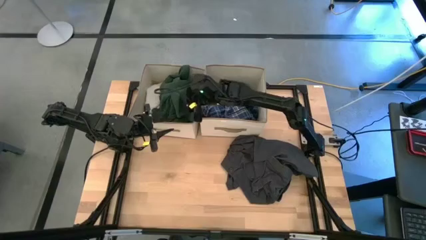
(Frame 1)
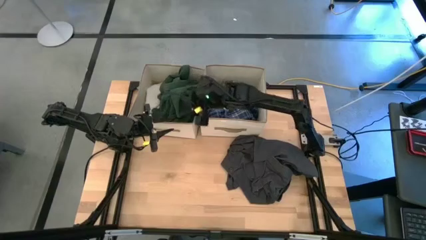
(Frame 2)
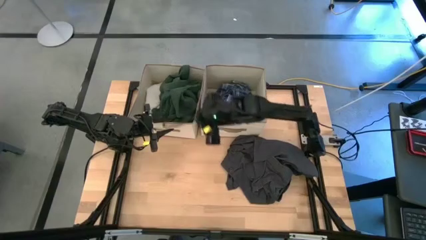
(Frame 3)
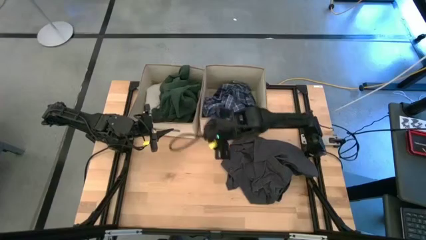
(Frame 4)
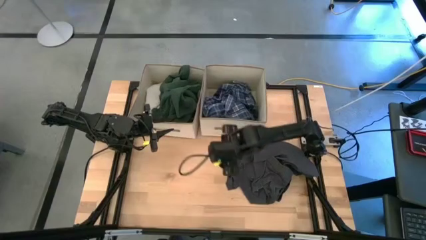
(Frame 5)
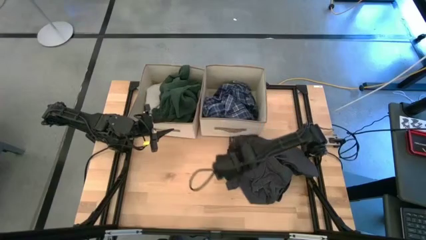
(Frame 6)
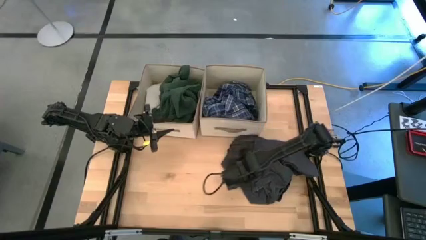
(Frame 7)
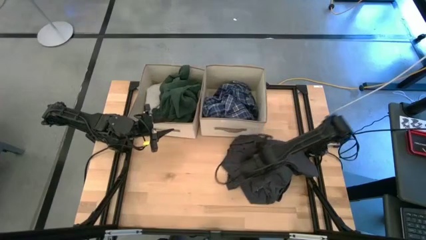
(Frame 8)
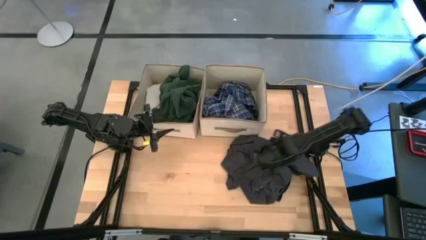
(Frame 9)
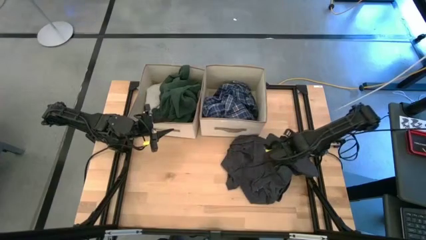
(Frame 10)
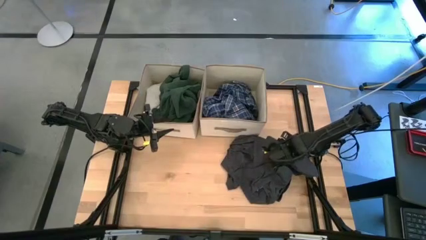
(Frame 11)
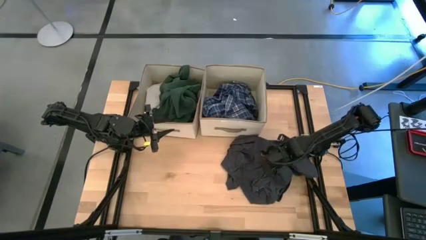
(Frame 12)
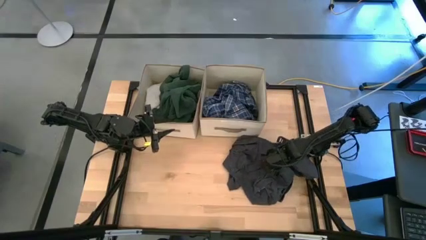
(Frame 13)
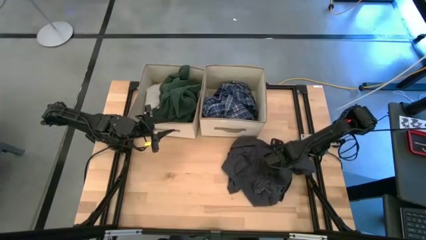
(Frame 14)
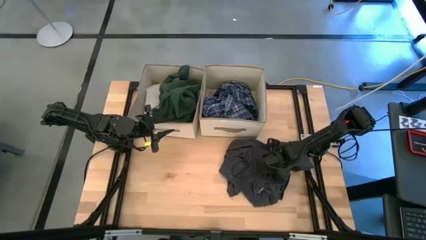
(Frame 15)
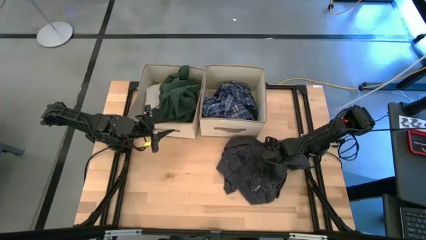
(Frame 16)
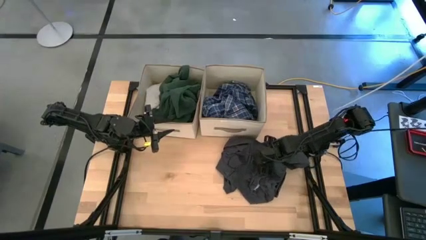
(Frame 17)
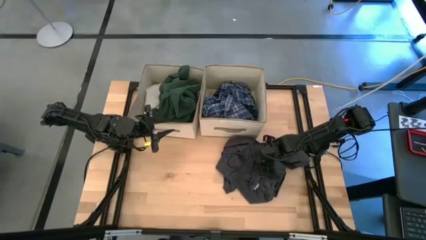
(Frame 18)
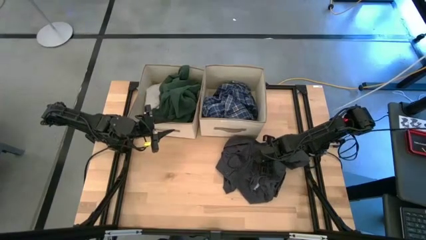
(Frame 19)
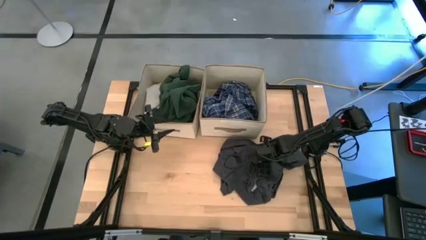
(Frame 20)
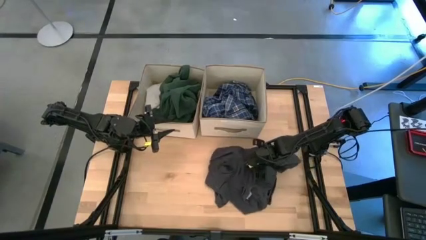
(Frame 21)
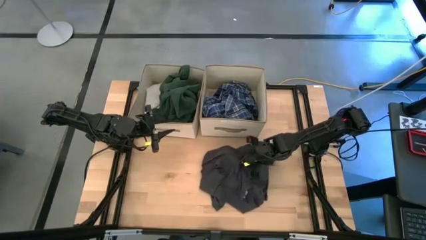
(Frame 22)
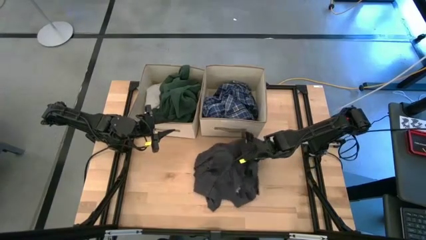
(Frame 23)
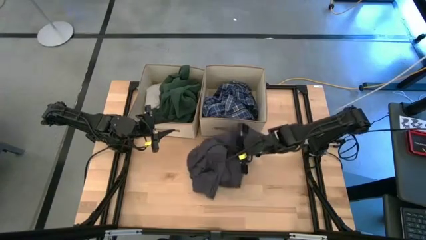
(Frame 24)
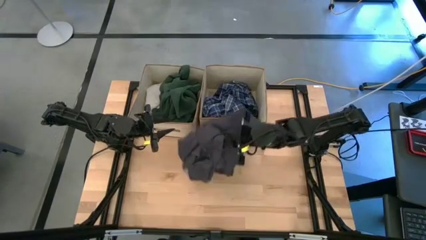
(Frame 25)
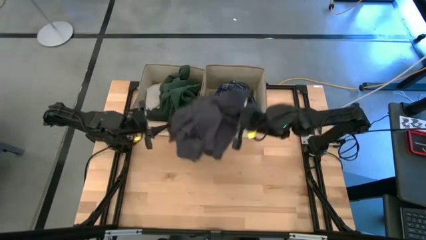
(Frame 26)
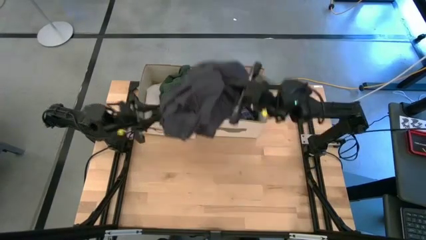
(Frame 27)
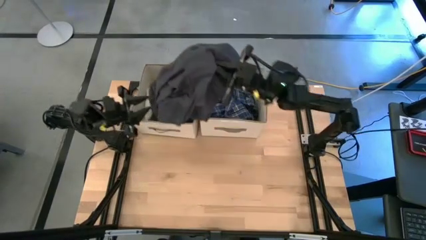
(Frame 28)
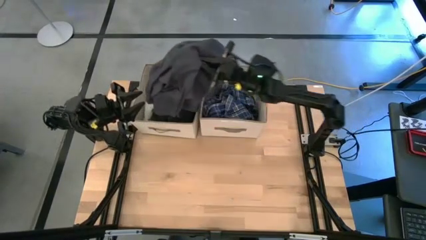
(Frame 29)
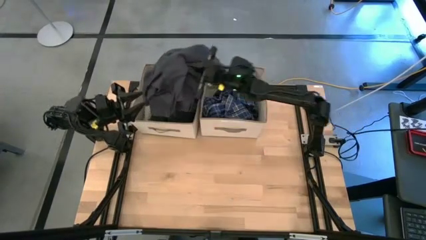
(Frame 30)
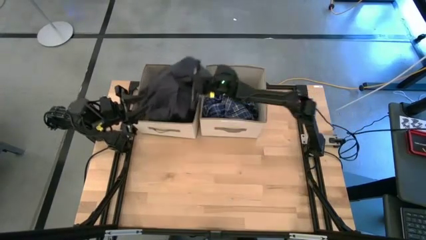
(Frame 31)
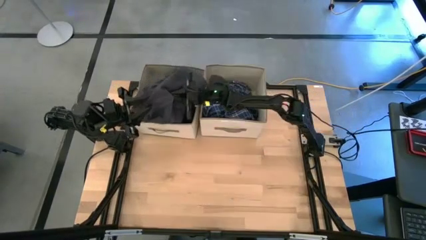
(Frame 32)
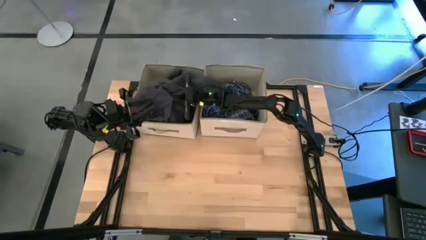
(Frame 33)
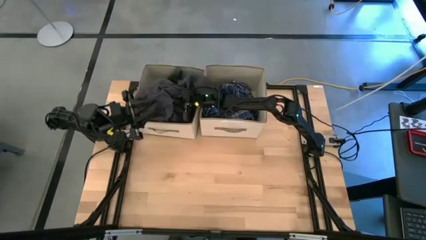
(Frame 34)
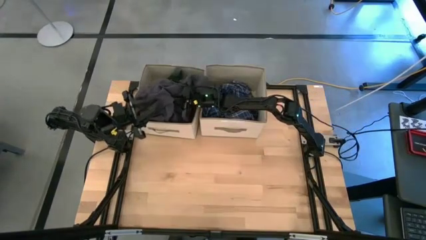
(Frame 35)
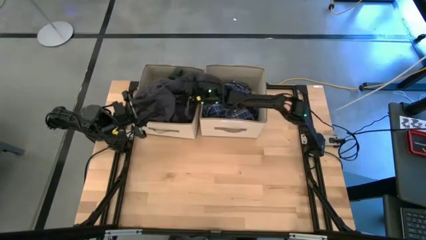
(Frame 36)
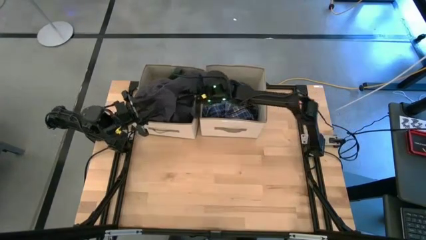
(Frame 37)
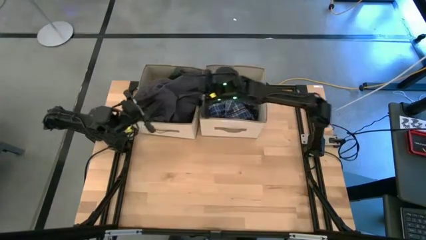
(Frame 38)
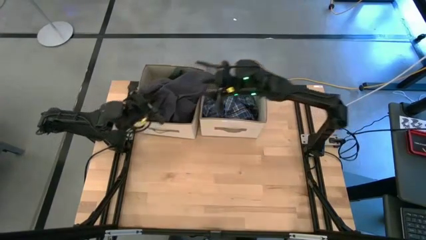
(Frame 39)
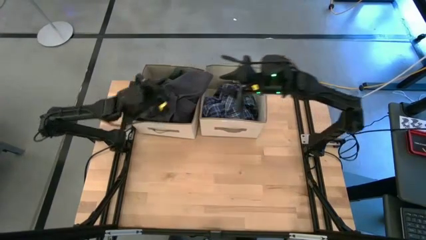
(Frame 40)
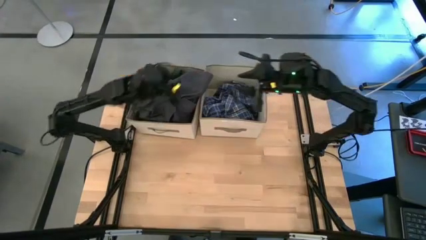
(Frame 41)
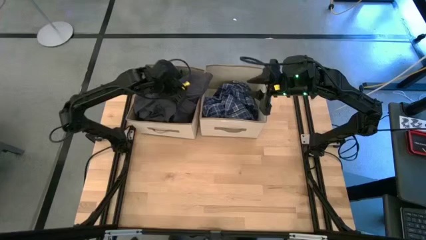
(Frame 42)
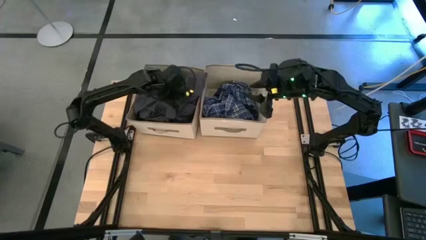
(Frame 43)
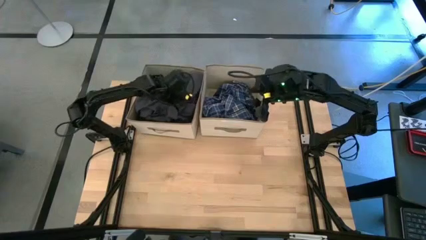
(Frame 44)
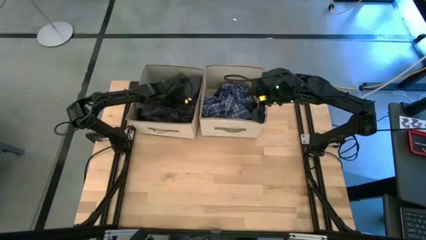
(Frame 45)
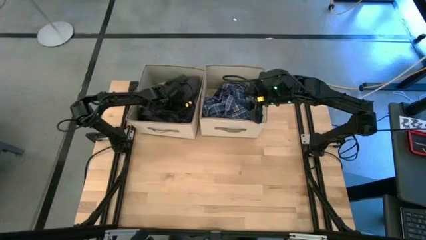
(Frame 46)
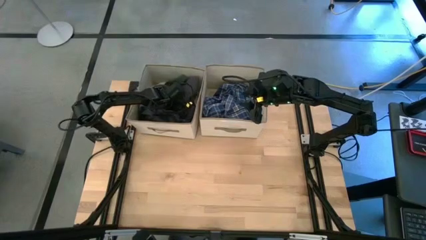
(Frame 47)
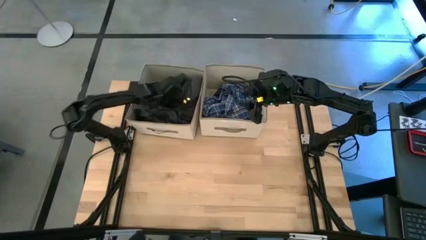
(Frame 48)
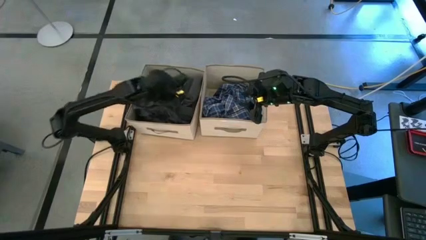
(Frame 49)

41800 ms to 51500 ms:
Task: Sort clothes
Put the gray polo shirt into the left laundry organizer

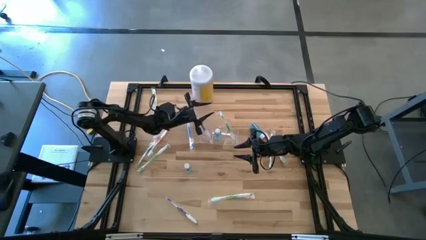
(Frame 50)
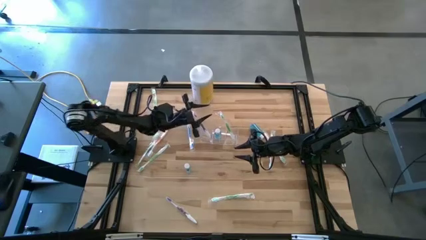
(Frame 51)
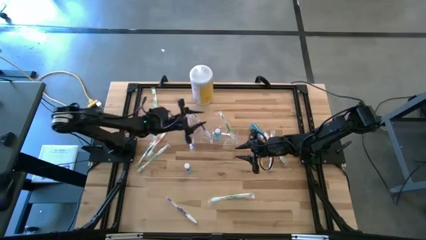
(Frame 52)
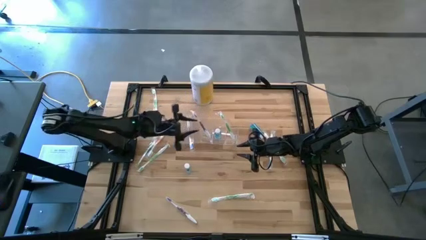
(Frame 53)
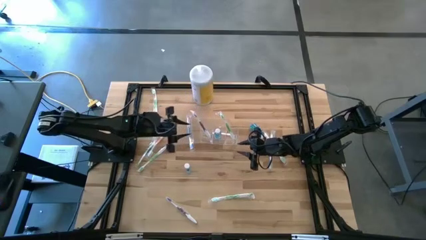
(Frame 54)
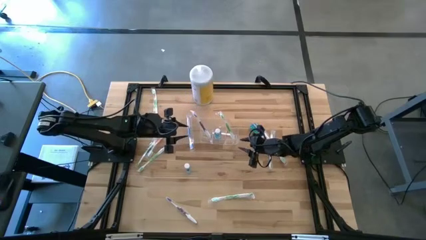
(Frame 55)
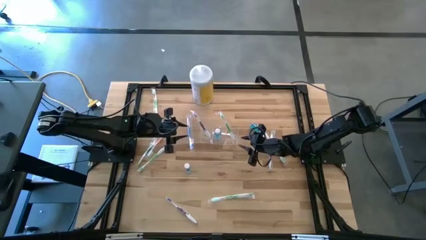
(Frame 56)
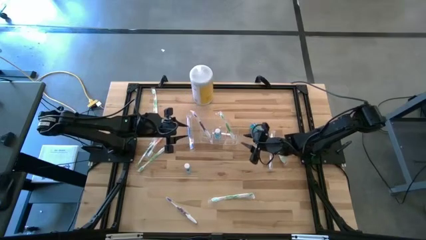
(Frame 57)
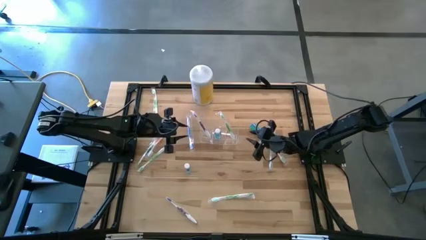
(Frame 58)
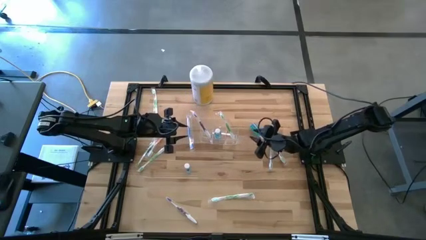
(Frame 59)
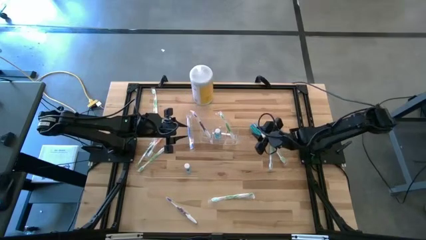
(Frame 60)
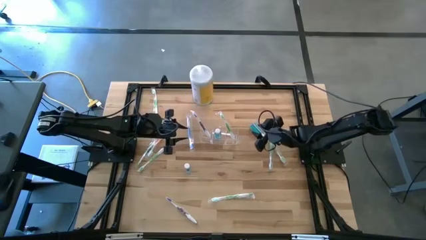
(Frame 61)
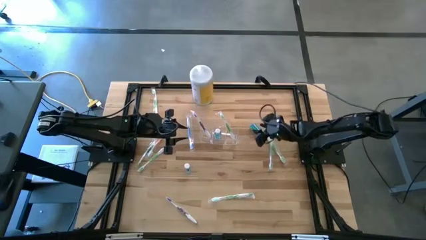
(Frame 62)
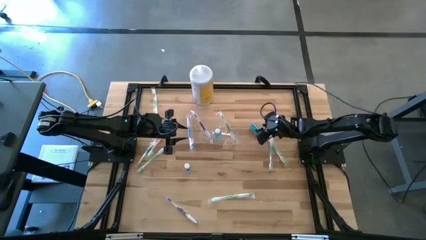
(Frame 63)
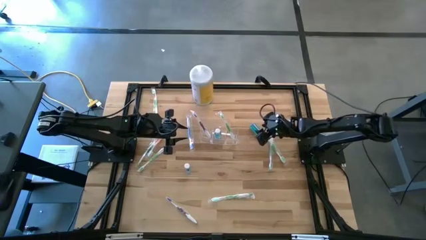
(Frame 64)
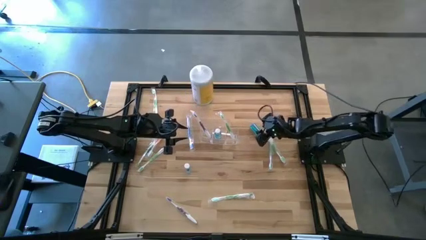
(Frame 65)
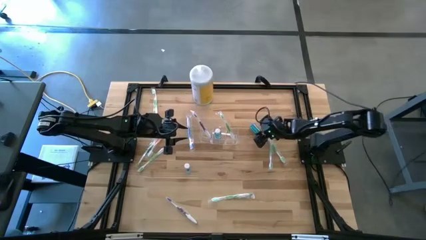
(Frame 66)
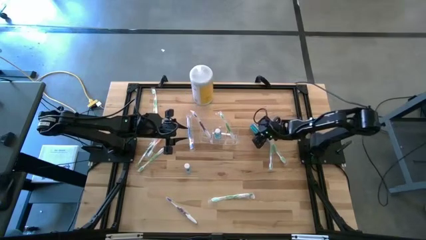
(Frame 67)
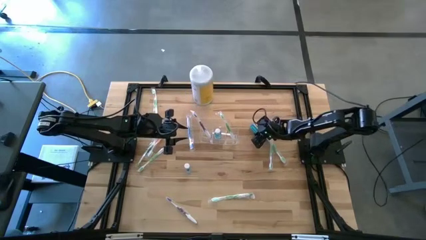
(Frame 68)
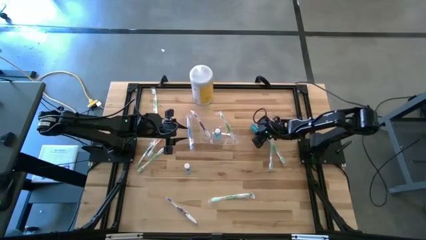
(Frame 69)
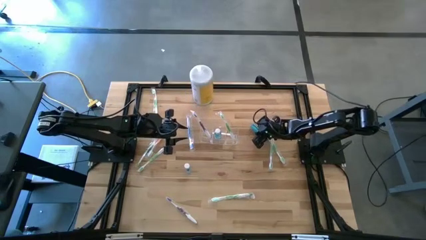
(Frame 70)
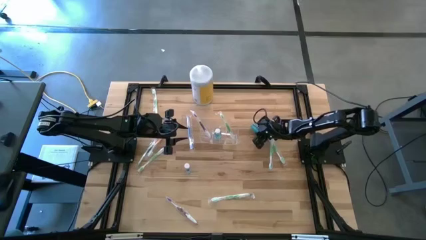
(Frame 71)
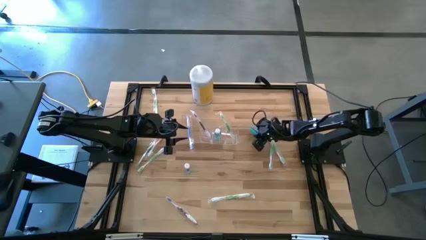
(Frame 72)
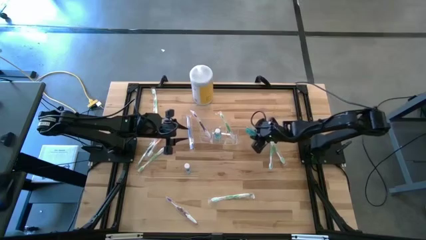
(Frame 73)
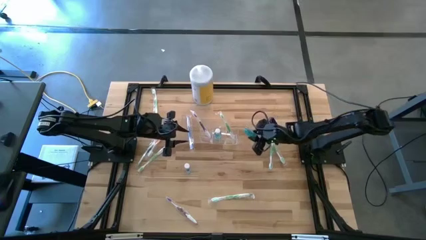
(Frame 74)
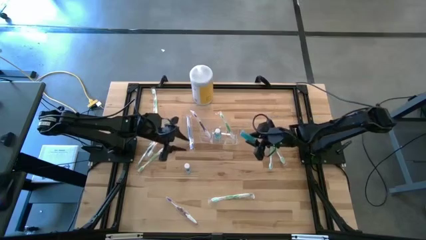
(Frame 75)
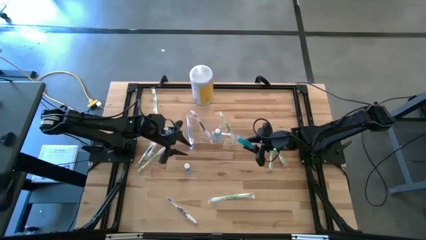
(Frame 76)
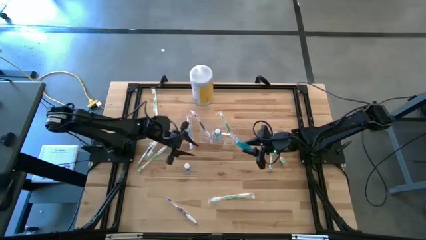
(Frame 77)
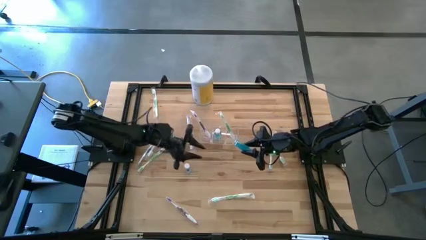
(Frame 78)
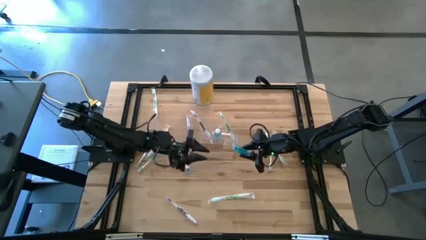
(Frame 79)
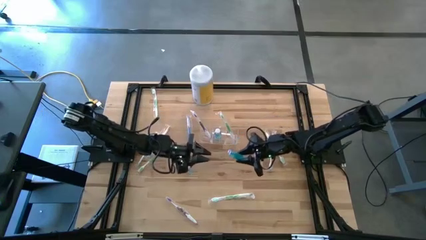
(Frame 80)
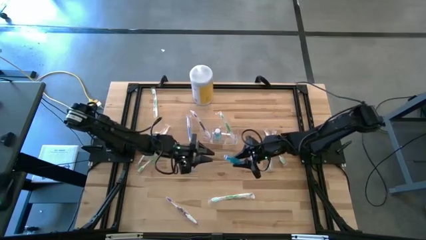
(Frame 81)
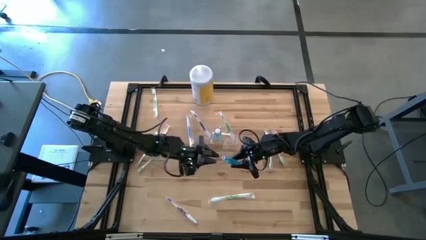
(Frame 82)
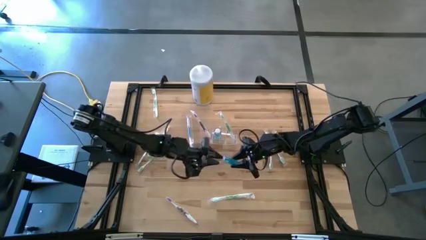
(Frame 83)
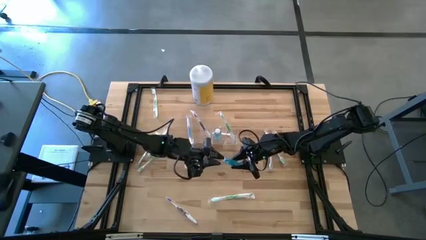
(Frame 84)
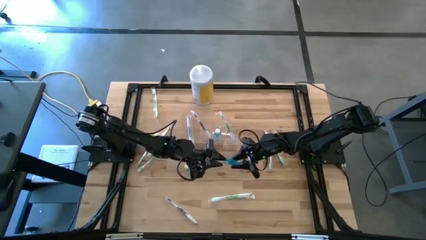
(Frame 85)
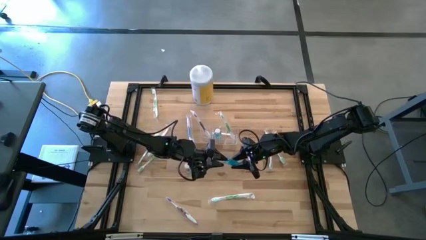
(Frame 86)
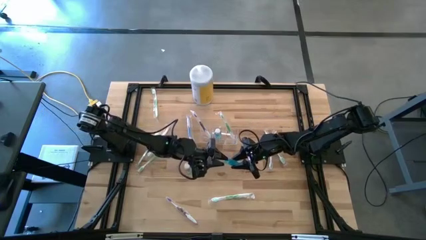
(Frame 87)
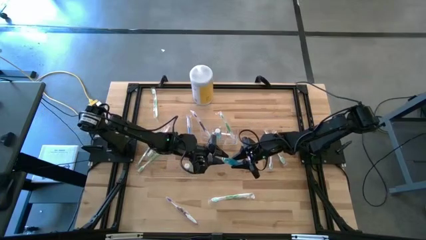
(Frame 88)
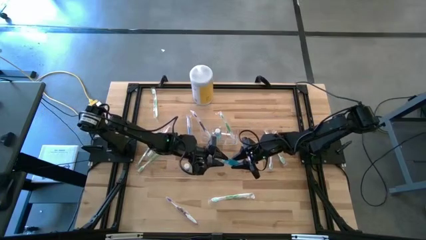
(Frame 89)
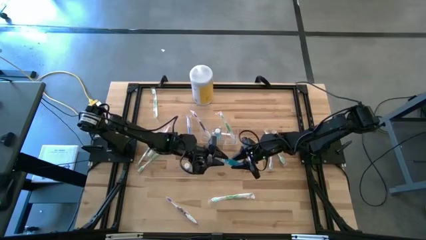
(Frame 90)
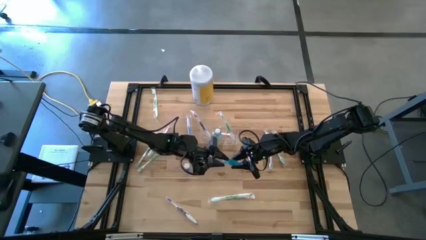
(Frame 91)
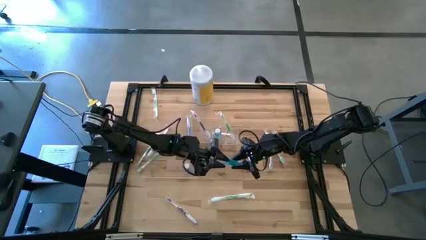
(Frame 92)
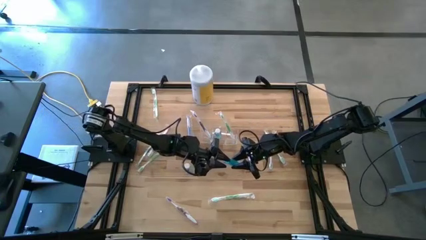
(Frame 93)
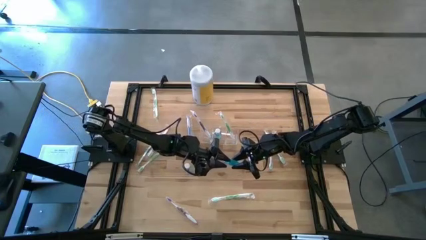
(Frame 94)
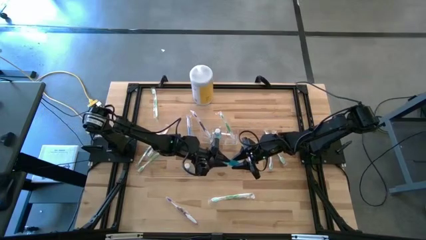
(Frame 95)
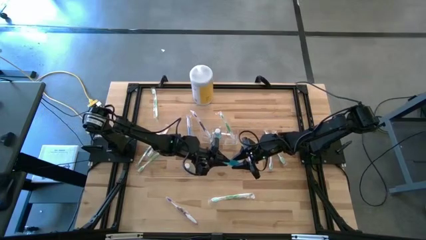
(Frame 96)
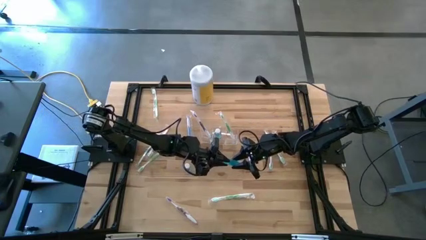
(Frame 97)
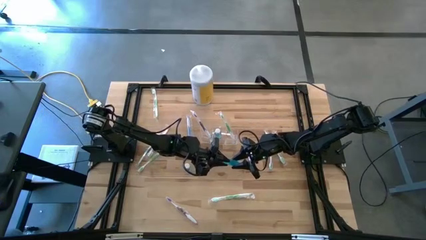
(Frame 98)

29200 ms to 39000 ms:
Task: Pick & Place toothbrushing station
Put the top mouthwash into the middle section of the transparent organizer
